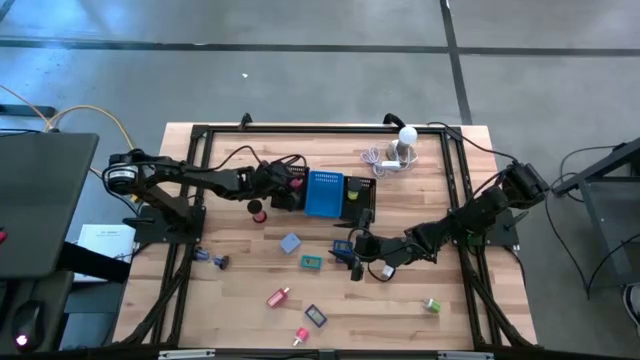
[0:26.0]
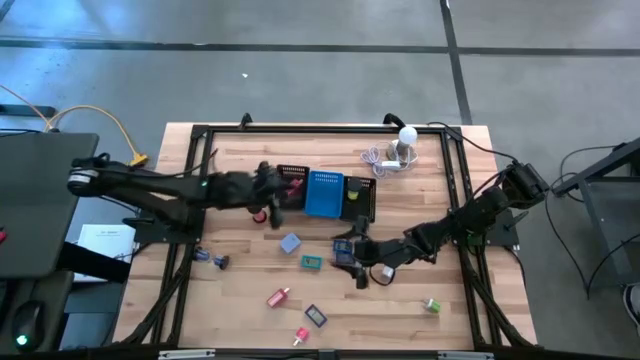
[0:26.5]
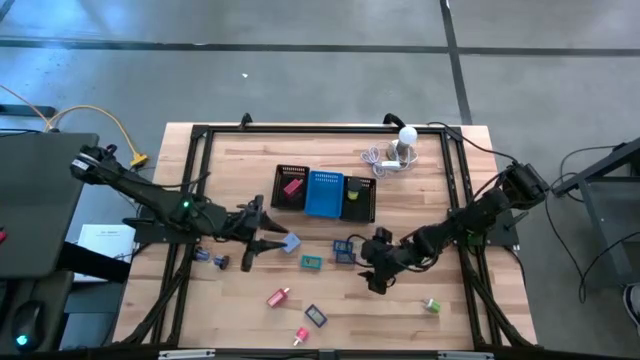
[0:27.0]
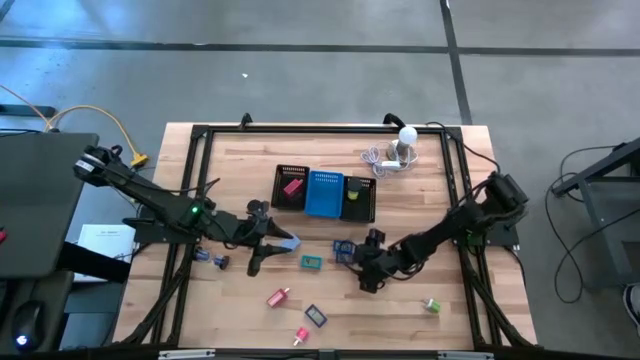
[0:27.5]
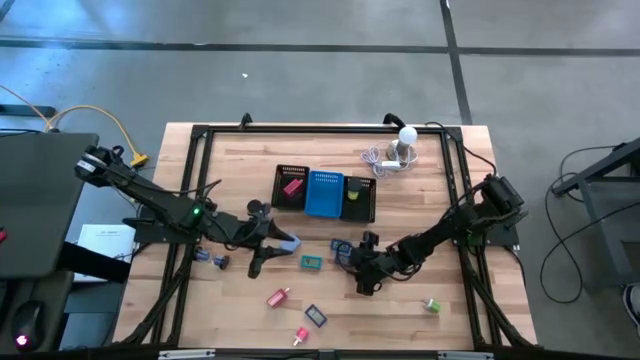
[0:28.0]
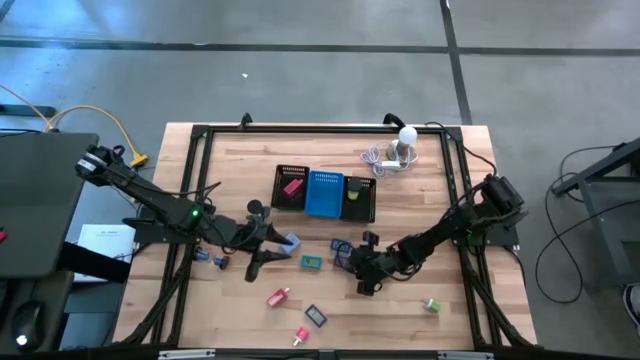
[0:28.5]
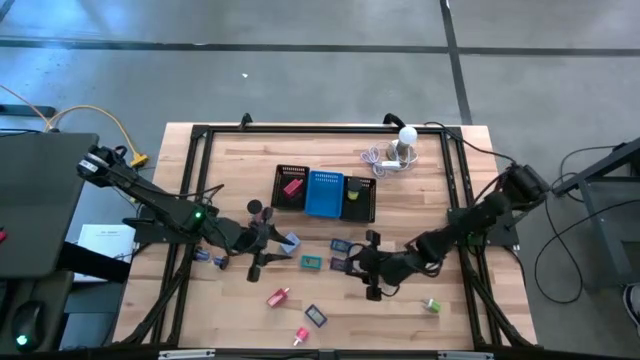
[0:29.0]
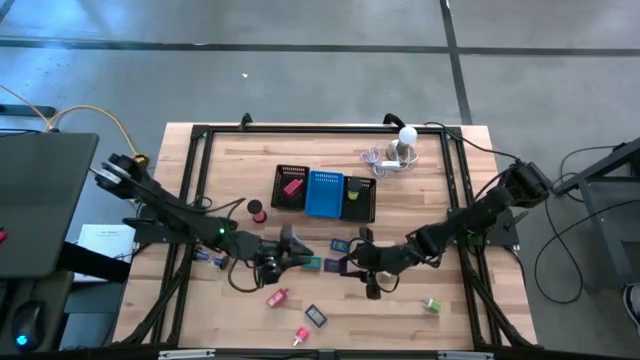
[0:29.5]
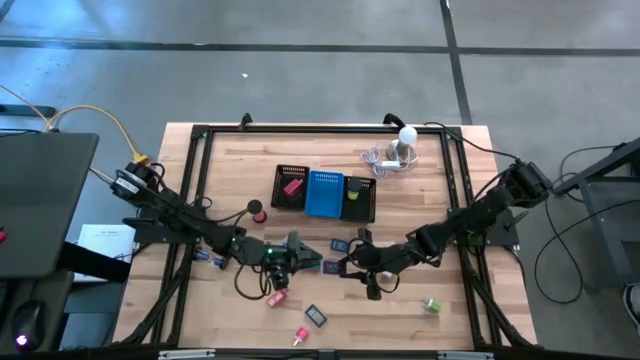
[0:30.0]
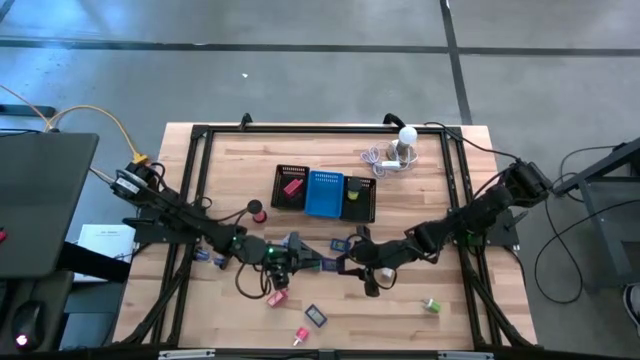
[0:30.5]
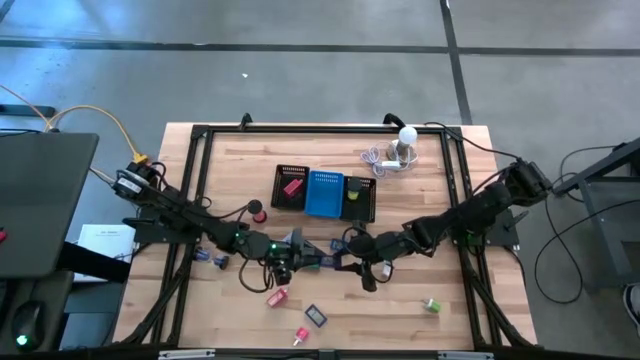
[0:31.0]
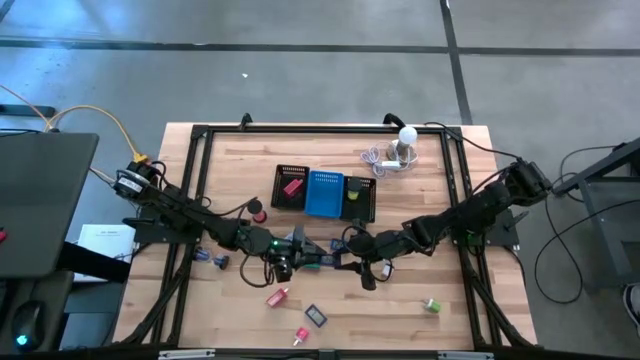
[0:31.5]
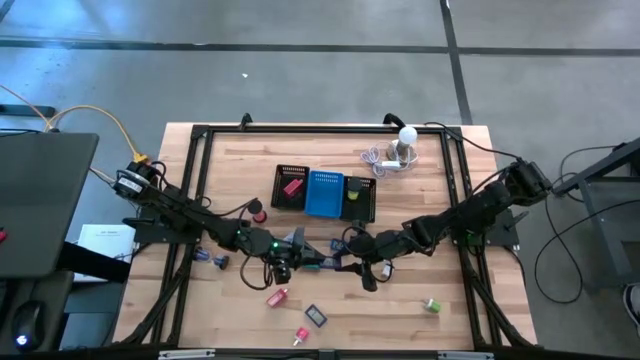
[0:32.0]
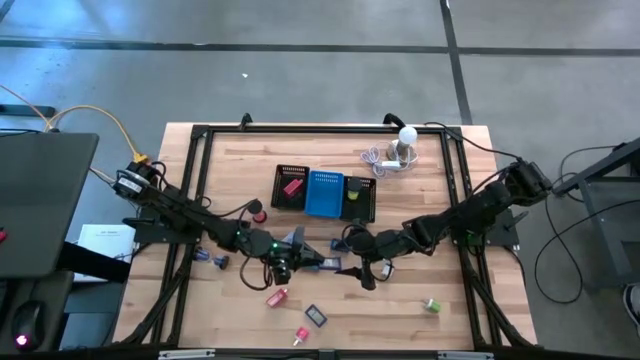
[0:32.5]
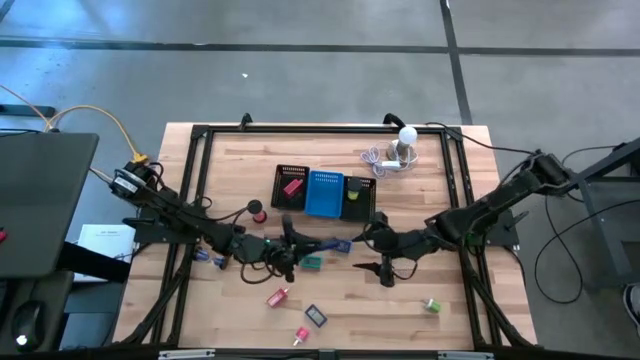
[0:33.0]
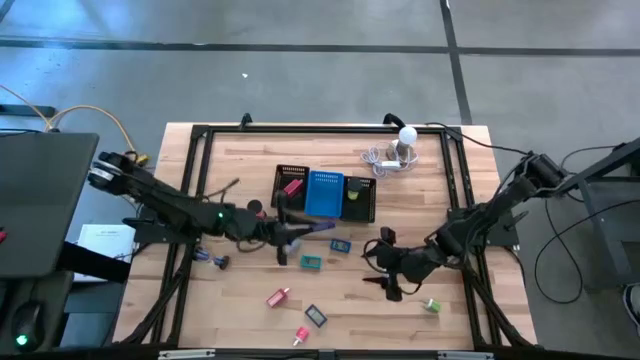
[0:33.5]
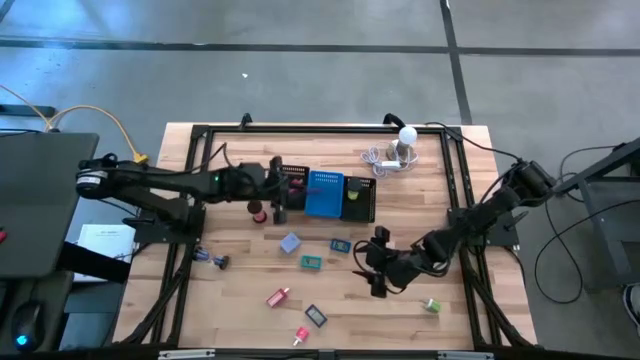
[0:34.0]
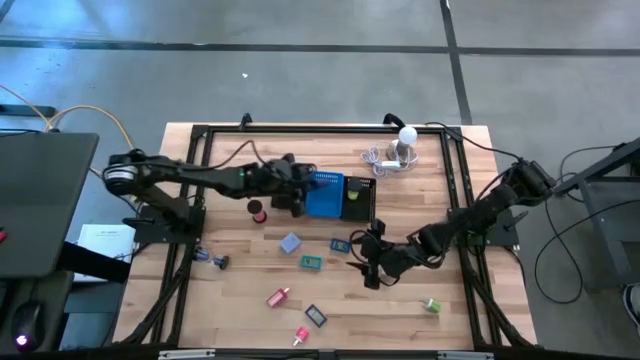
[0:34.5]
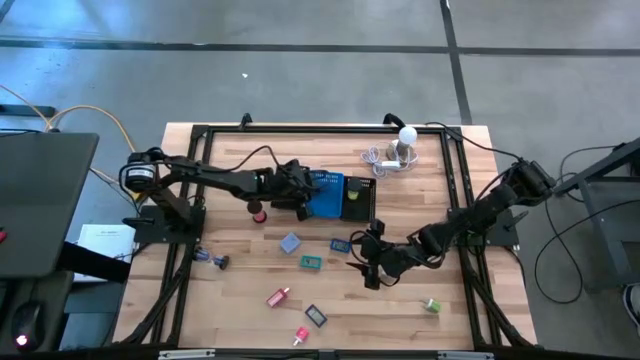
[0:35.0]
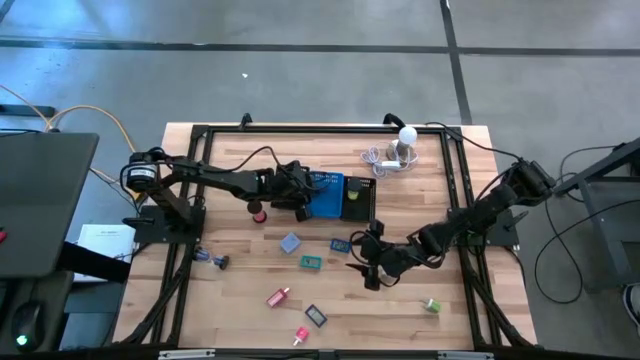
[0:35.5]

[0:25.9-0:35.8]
Task: Pick & Place Office items
Put the top purple digital clock into the blue bin
